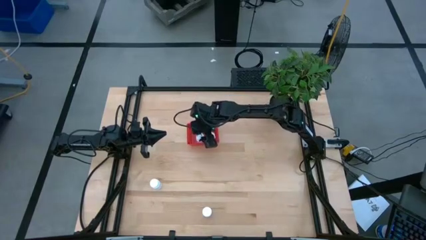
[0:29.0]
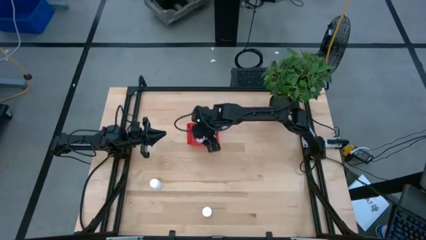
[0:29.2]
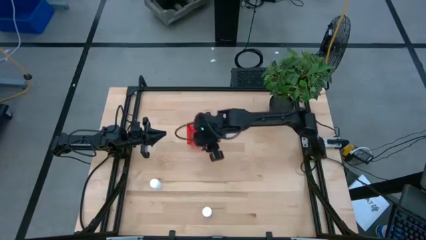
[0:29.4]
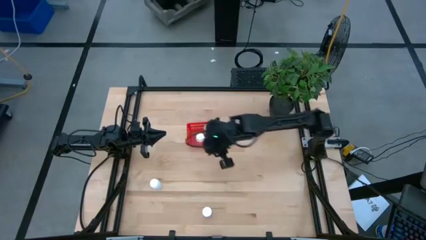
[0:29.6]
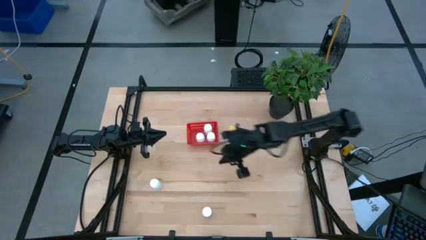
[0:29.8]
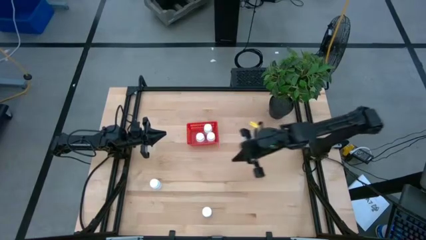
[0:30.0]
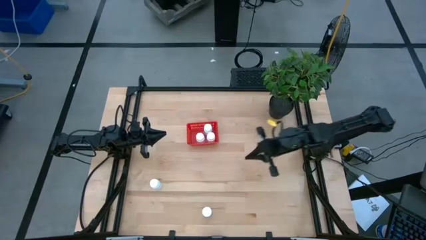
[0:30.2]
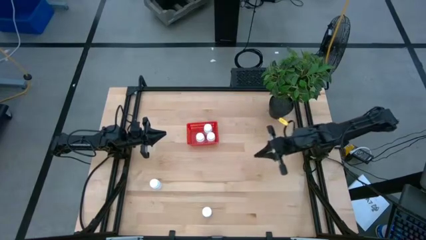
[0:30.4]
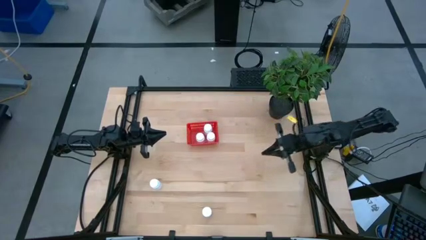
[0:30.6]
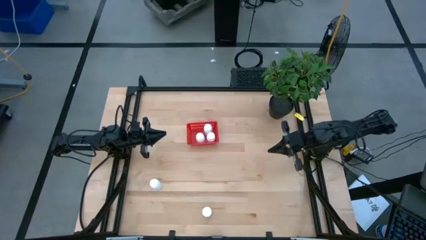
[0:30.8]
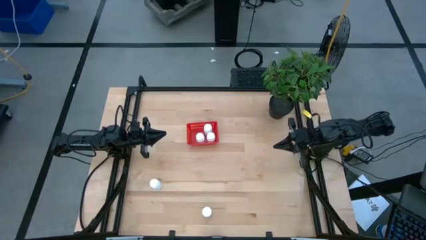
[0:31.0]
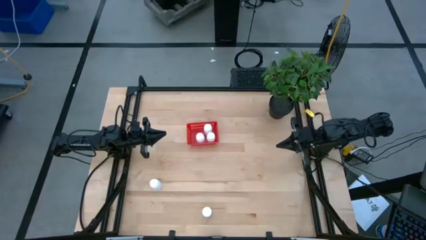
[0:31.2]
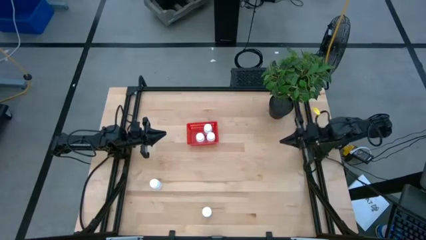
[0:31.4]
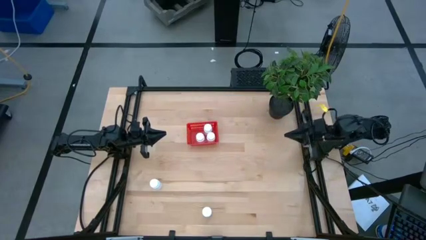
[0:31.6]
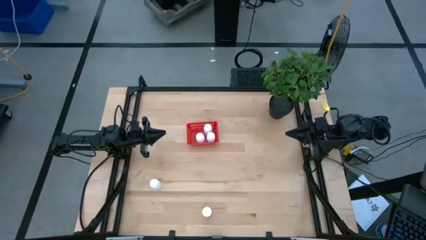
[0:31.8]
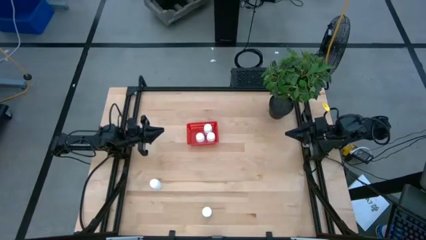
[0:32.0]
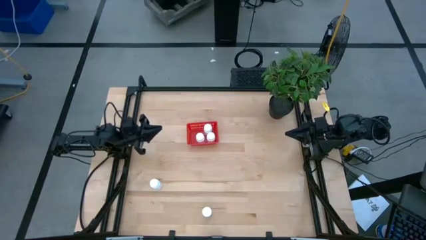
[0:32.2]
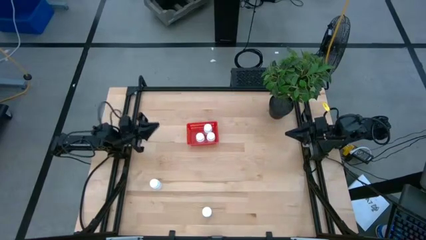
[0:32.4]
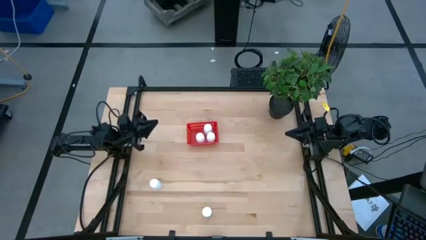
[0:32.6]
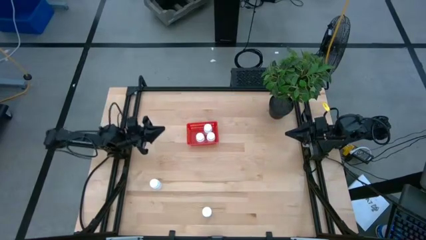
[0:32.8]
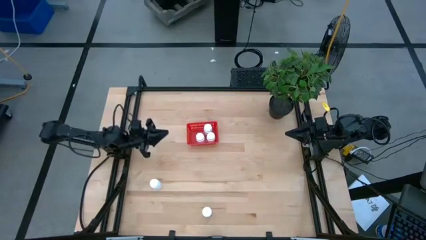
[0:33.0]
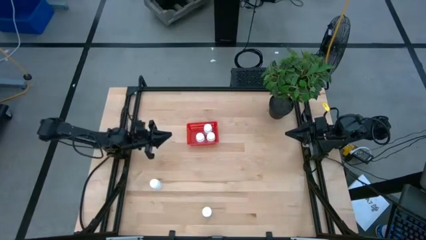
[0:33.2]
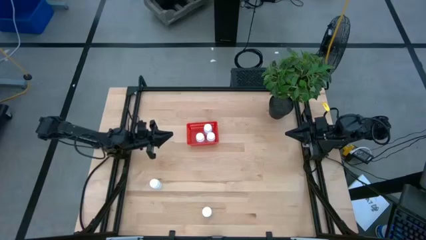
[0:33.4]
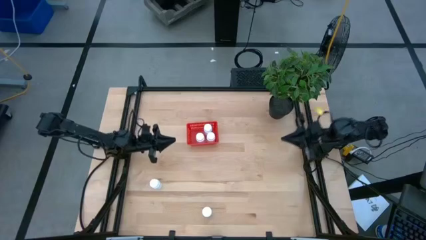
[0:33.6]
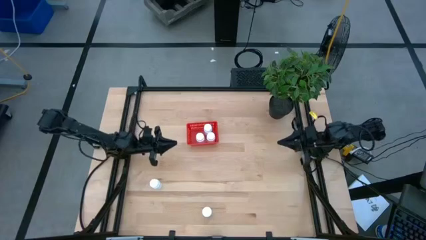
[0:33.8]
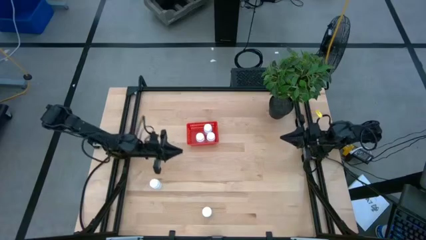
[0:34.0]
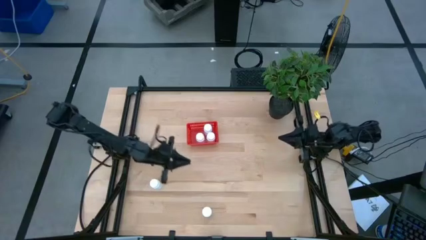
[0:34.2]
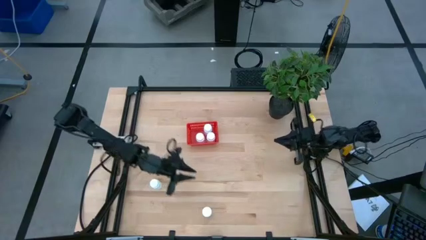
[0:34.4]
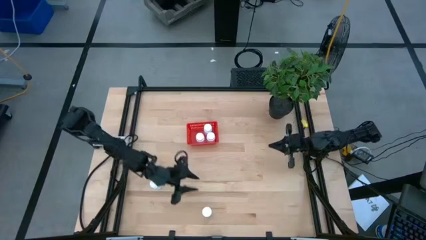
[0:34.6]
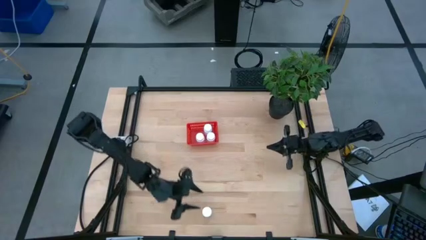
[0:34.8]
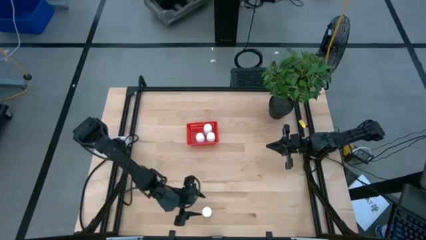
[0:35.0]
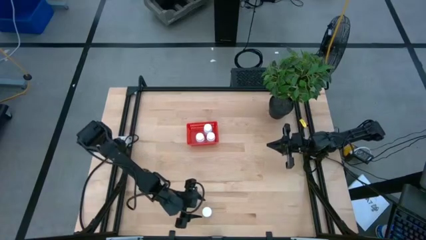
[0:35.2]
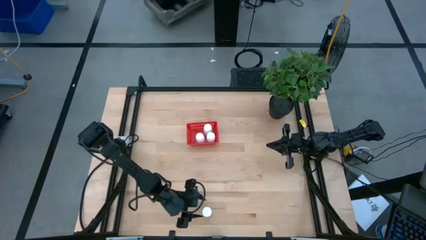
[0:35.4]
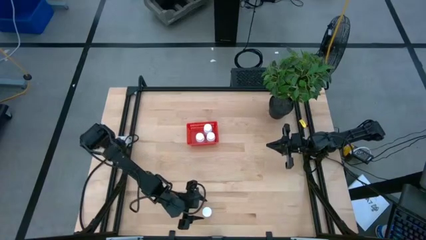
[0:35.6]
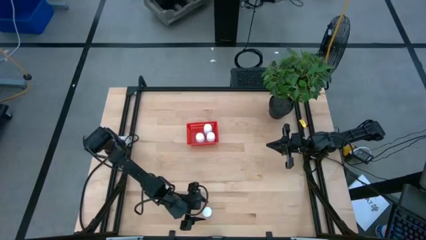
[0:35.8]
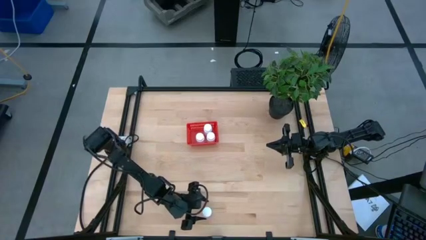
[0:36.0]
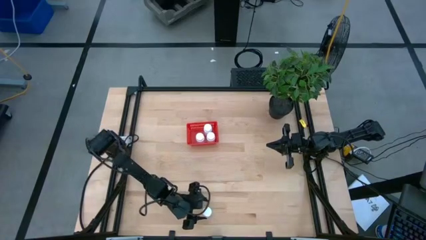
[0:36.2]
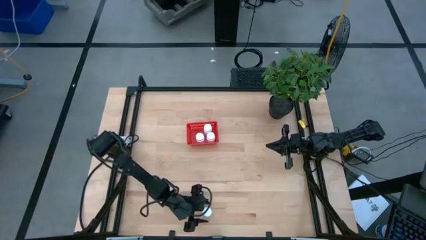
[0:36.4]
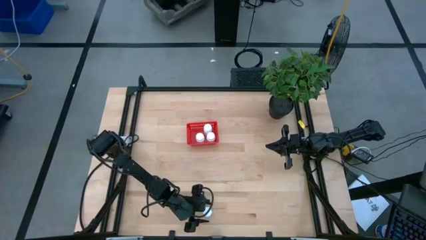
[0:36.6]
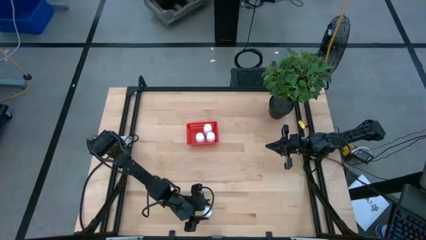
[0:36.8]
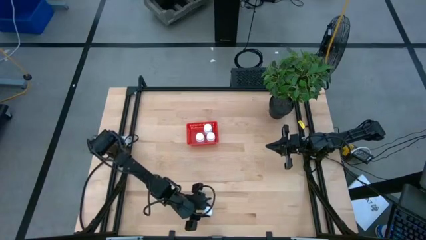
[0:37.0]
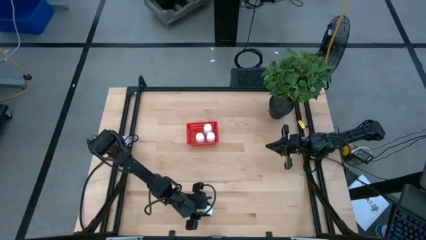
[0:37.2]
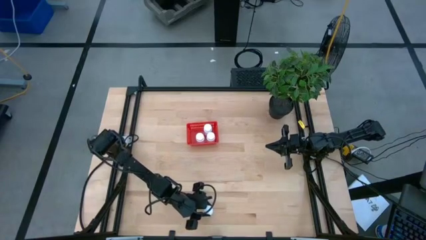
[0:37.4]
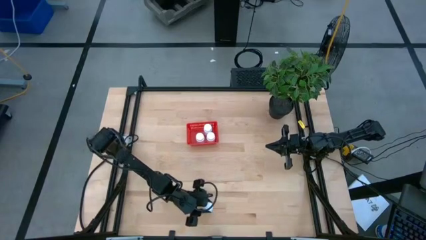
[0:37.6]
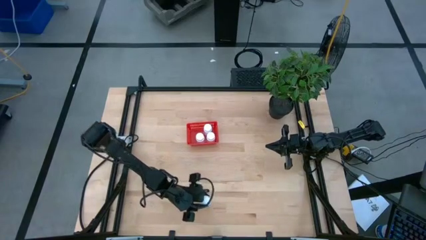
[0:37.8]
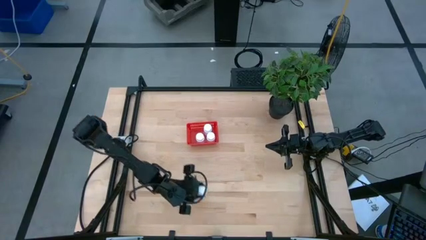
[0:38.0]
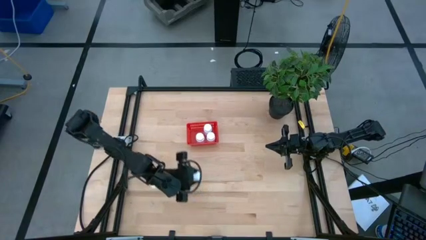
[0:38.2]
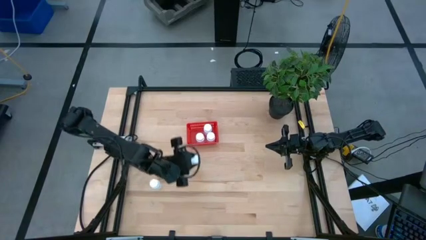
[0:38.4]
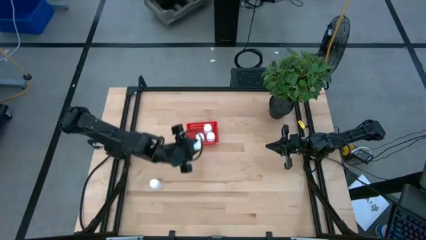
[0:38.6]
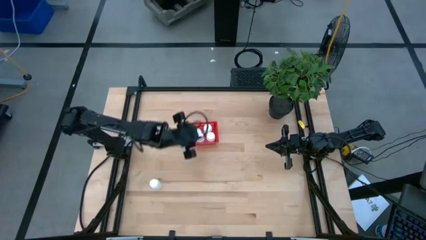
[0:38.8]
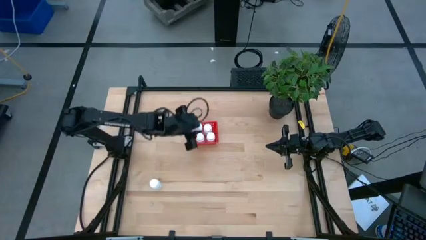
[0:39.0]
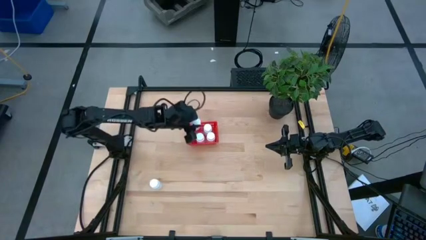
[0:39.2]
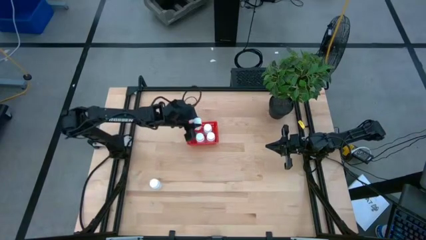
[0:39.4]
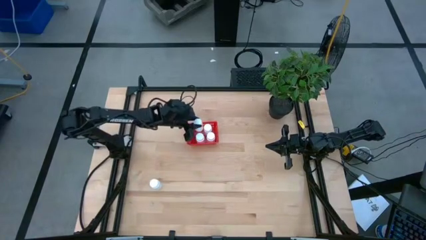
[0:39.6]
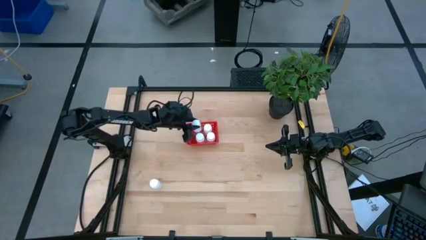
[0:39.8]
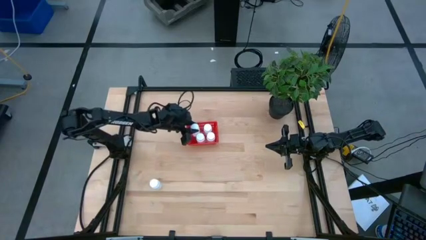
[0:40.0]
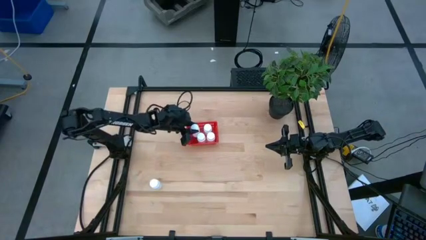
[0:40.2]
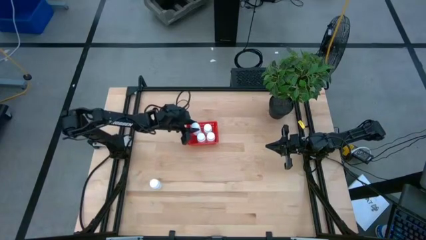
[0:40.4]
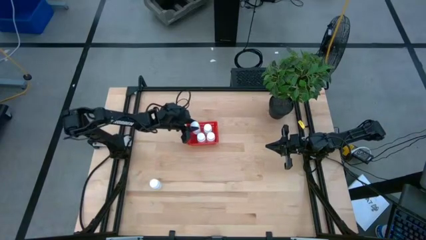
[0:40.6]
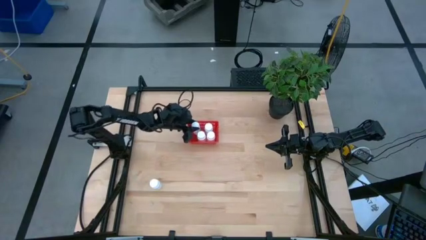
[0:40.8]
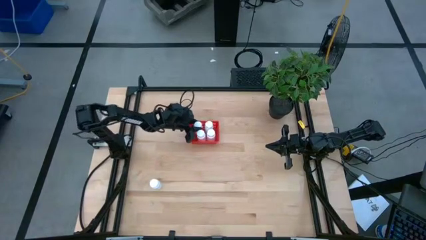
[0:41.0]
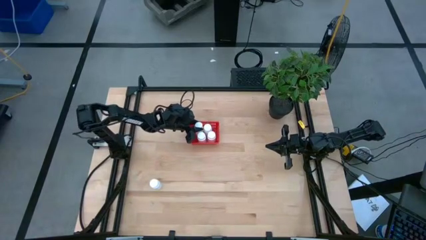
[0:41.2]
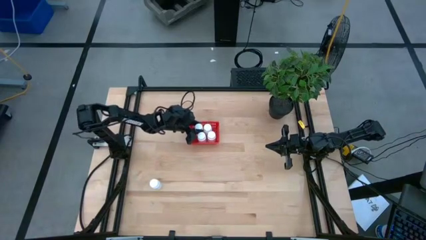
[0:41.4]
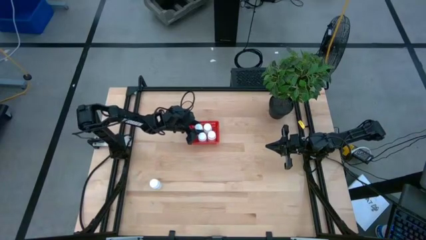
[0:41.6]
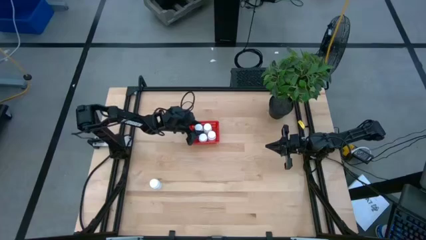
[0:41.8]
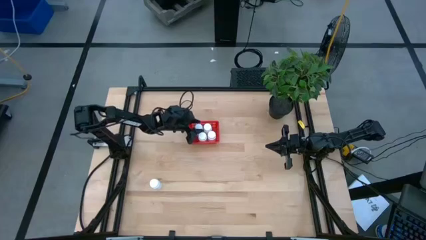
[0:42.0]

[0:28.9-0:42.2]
Task: Pick and place pill bottles into a basket
Put the white pill bottle into the red basket
